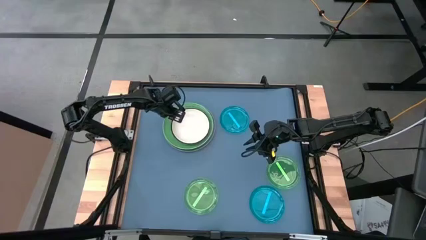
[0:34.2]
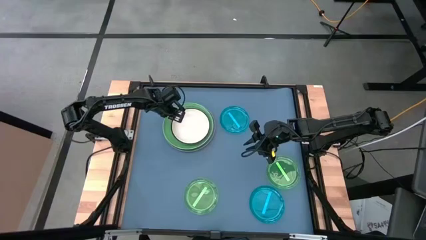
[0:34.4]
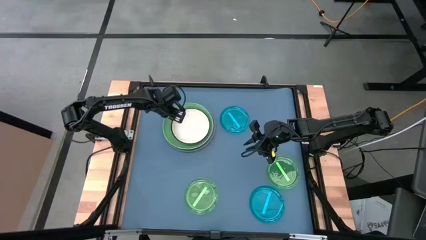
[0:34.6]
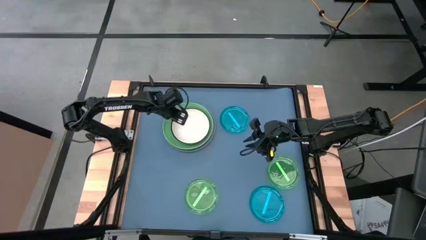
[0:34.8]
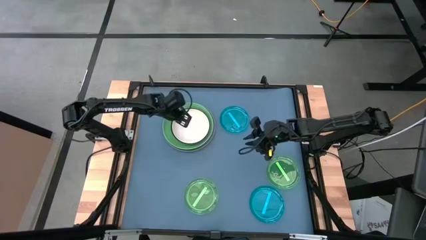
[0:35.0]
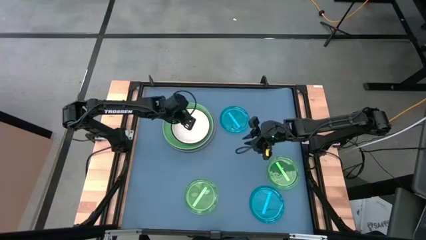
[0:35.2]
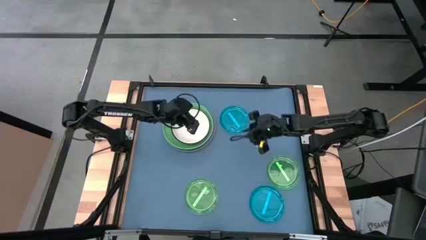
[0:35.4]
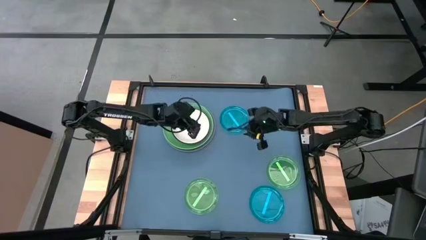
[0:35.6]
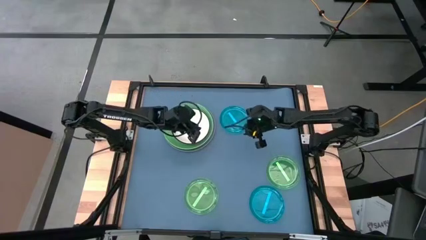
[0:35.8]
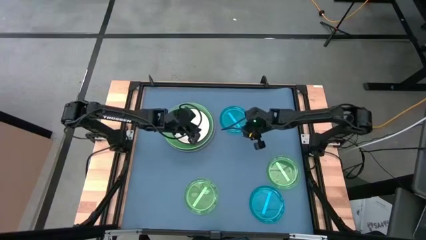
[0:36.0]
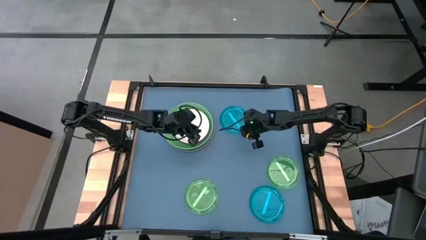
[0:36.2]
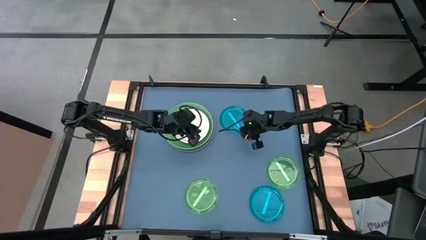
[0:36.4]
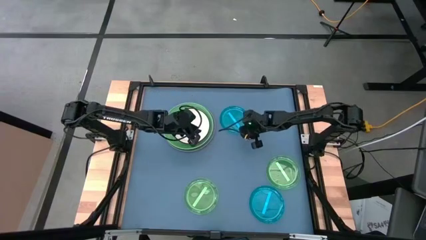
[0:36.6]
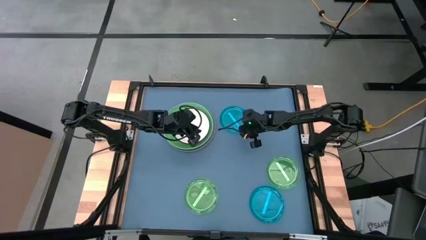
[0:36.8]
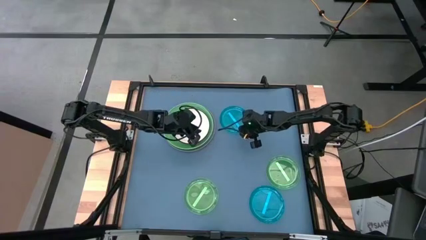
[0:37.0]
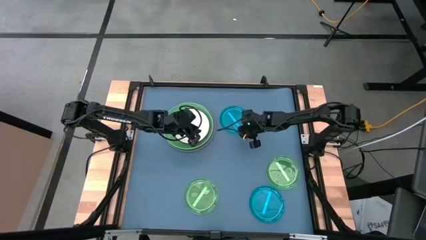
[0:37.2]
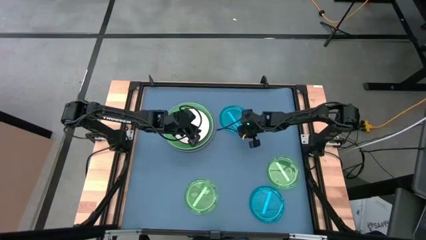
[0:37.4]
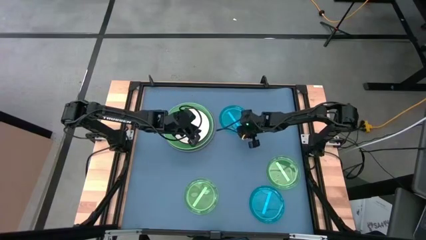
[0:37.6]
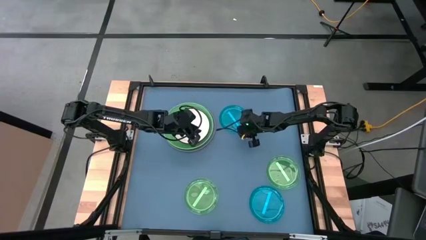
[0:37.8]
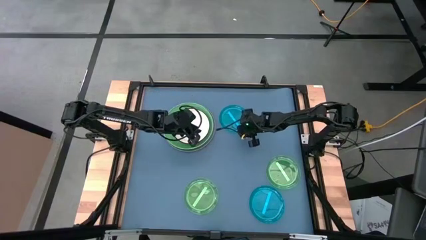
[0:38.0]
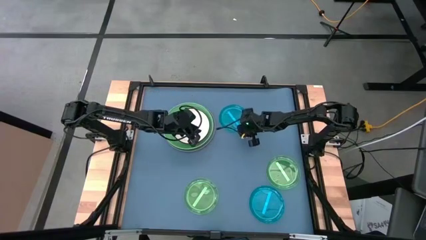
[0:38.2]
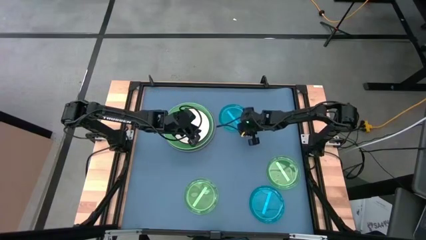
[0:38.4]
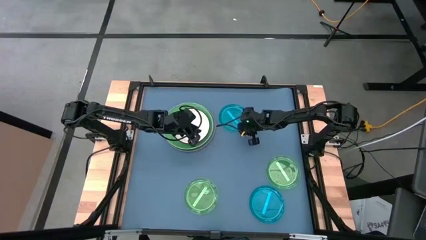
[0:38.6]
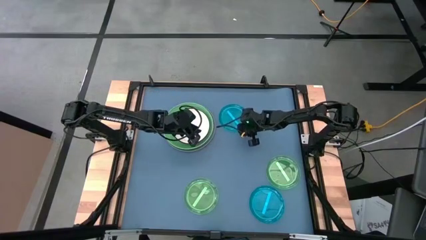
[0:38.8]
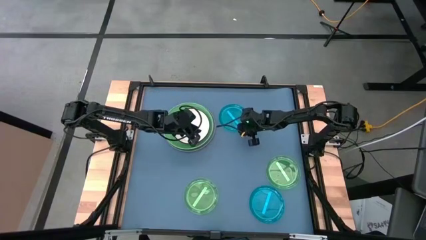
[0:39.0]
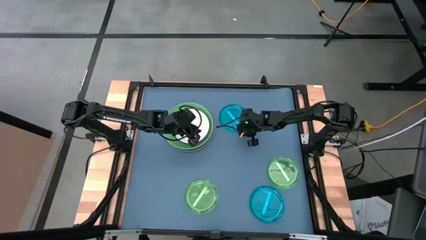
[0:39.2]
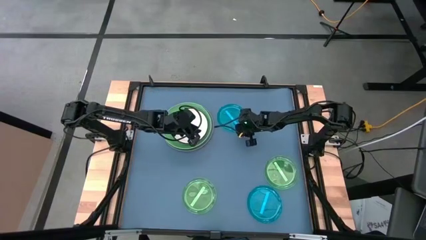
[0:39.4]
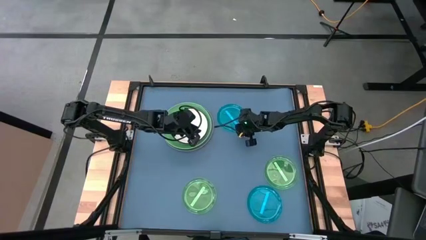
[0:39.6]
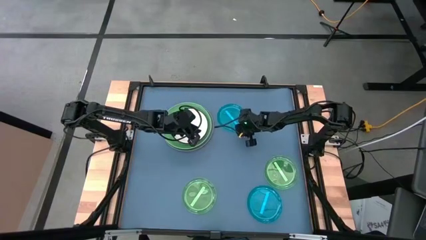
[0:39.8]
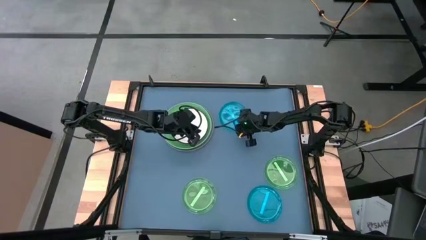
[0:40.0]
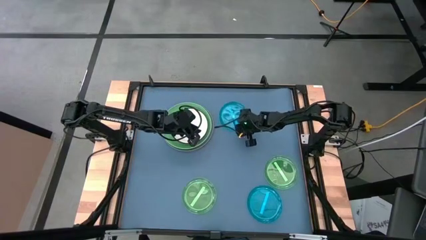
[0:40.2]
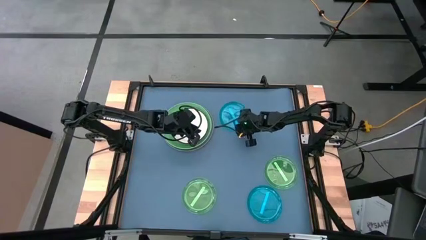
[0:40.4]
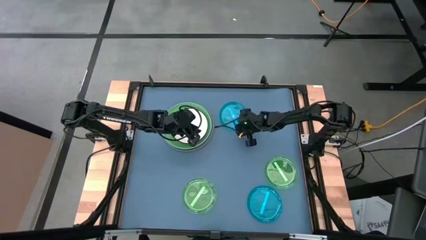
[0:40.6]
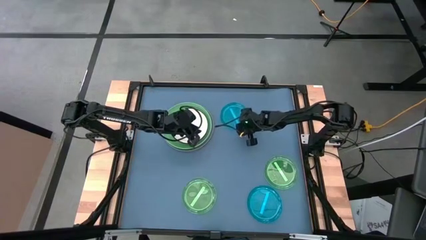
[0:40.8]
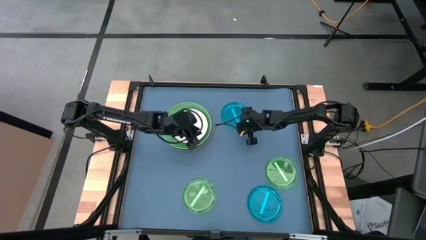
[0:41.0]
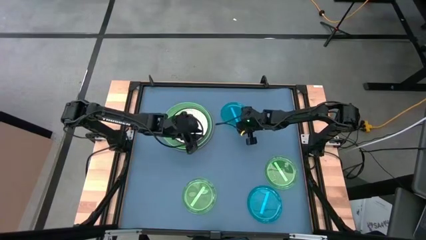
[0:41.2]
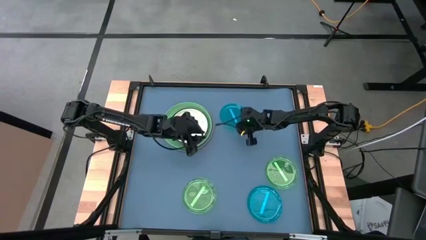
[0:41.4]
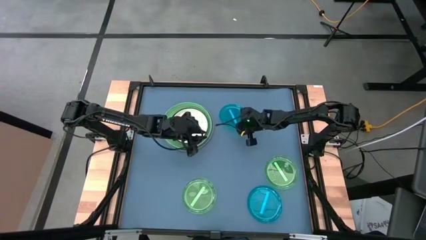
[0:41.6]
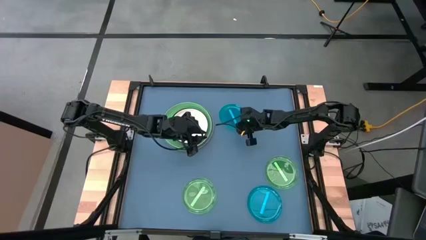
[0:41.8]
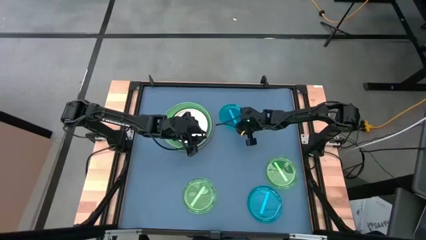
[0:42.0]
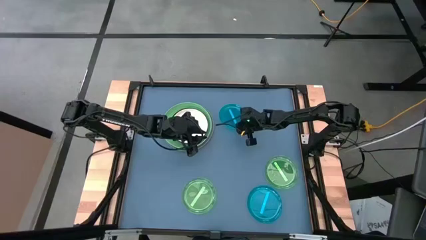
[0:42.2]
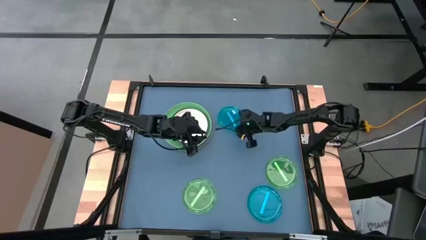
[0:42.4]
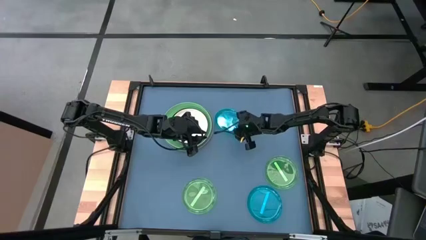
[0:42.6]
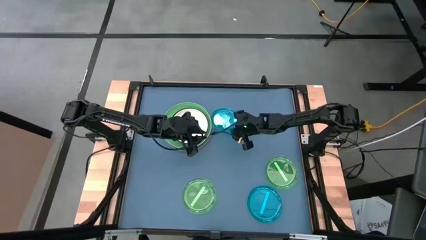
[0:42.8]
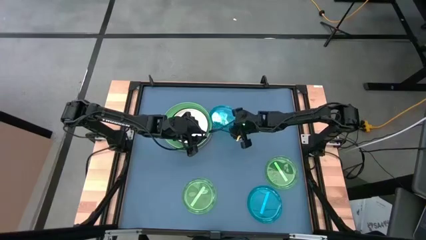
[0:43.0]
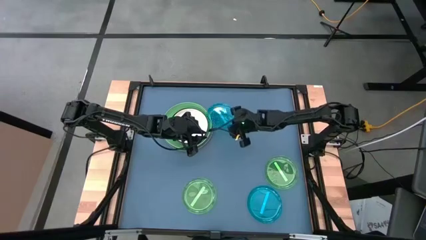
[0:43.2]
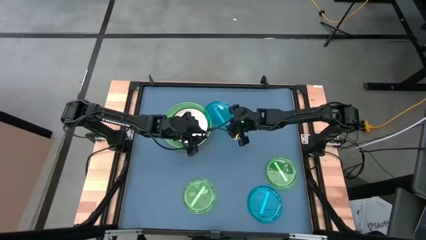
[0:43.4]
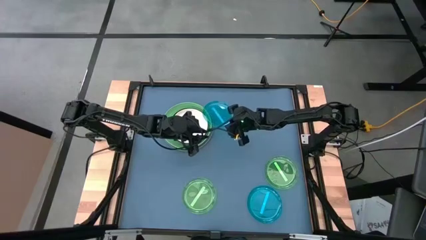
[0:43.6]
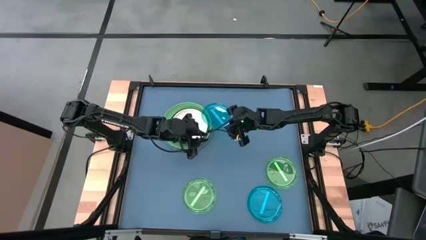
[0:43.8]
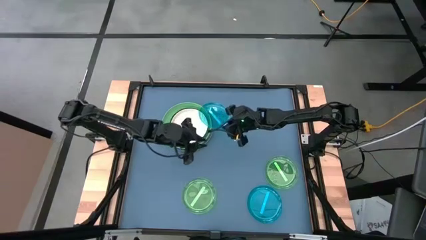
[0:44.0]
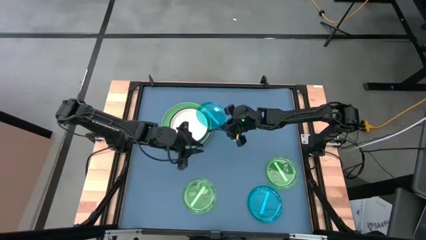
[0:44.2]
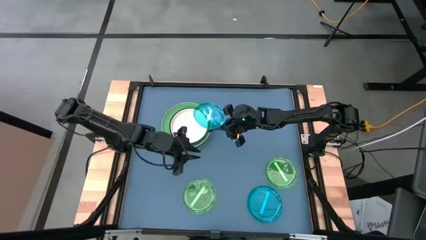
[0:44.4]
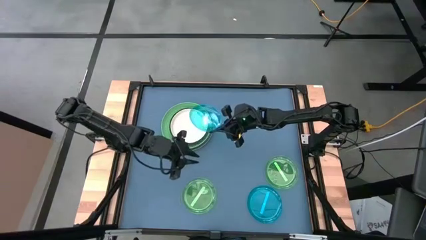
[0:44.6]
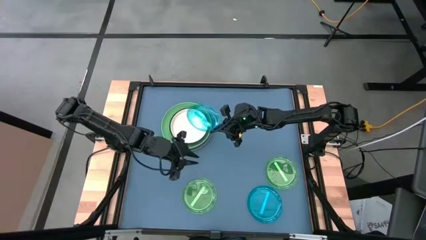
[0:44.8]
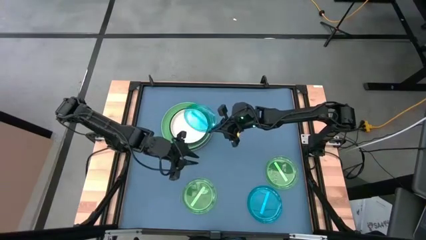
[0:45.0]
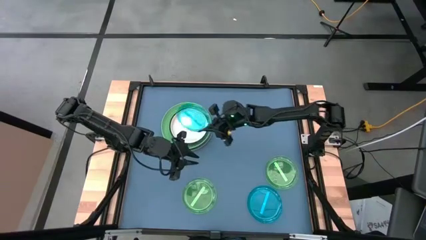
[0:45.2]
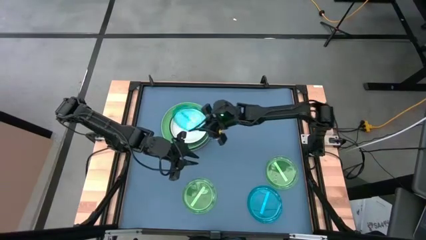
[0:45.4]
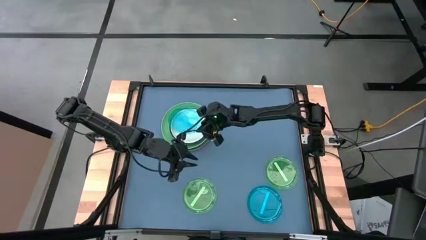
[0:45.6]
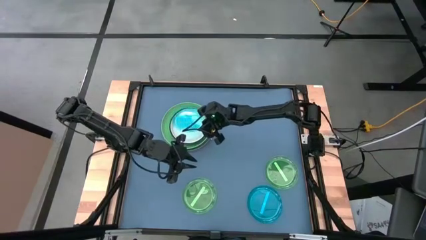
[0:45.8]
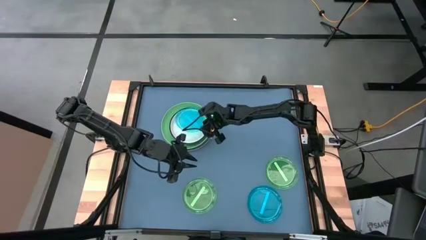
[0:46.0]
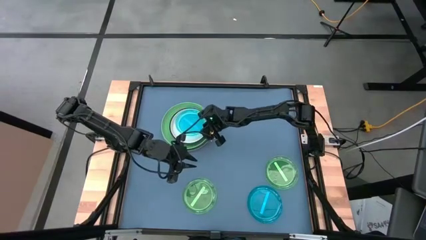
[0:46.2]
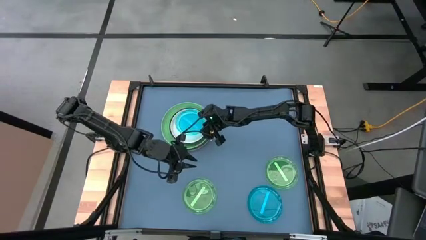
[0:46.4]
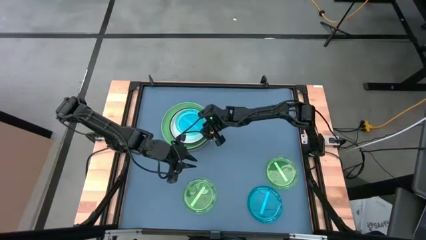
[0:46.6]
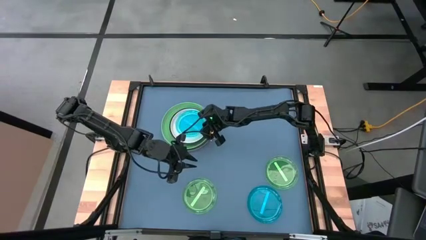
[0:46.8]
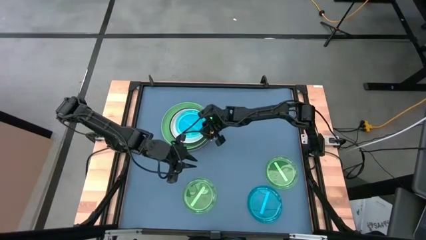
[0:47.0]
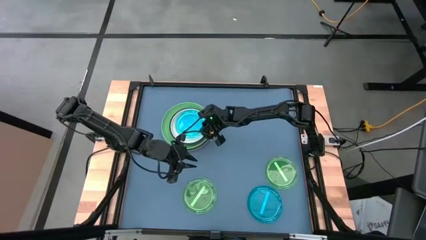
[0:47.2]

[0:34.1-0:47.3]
Task: Stack plastic plates
Stack the top blue plate on the white plate
